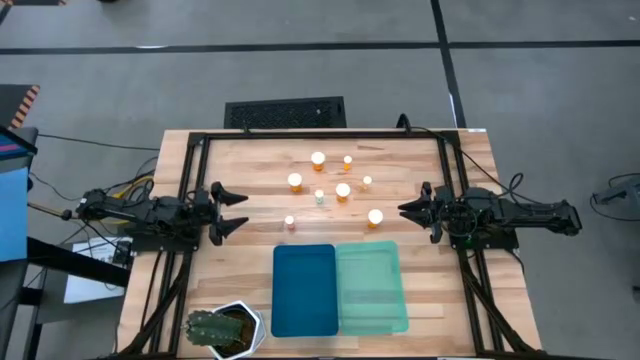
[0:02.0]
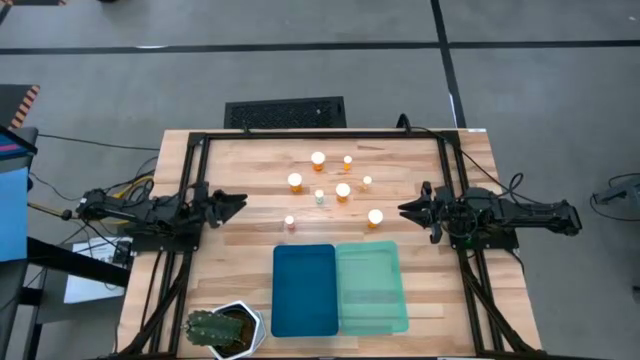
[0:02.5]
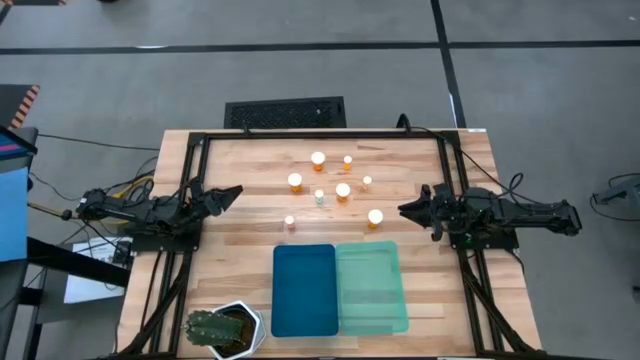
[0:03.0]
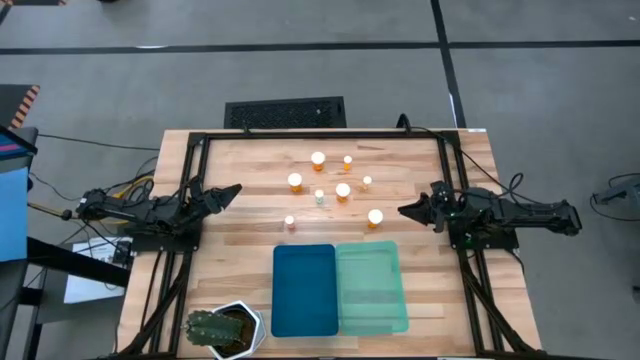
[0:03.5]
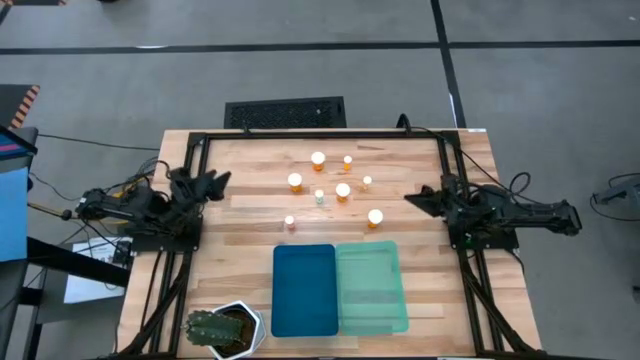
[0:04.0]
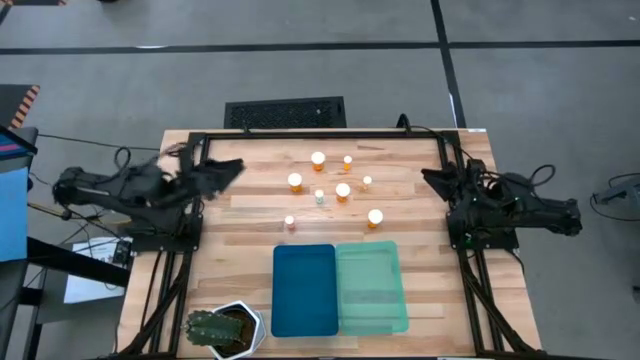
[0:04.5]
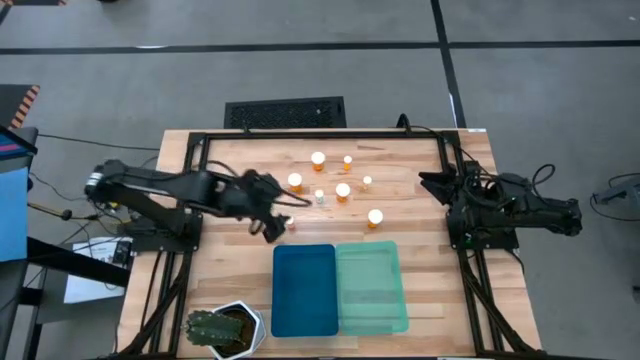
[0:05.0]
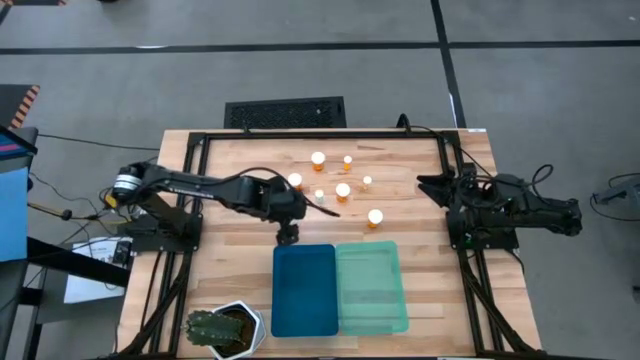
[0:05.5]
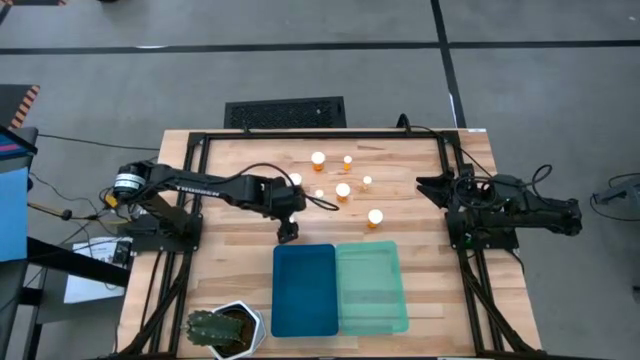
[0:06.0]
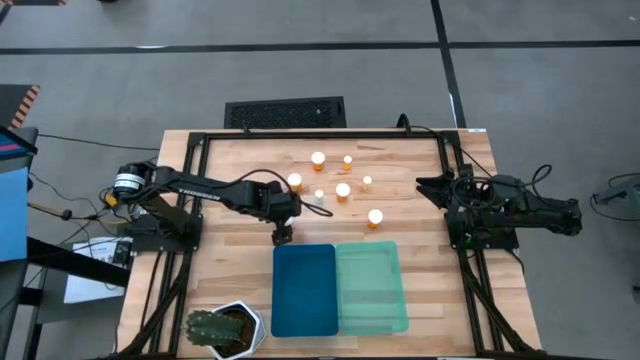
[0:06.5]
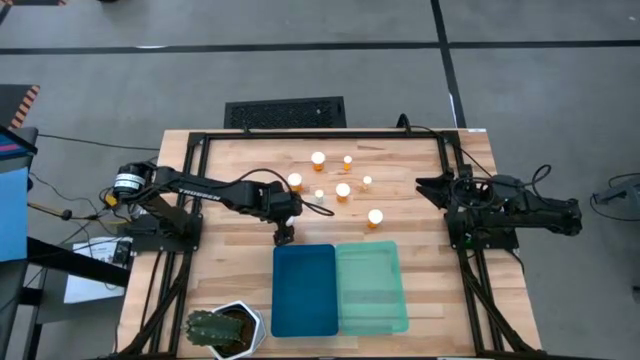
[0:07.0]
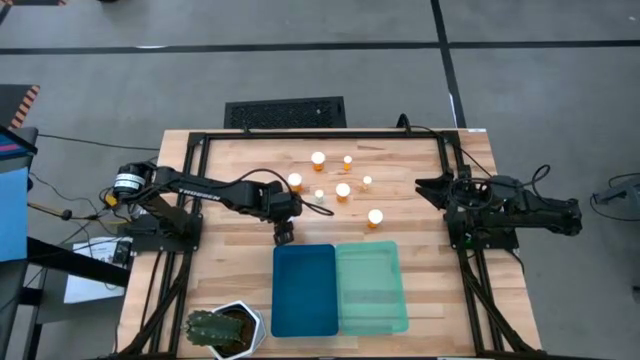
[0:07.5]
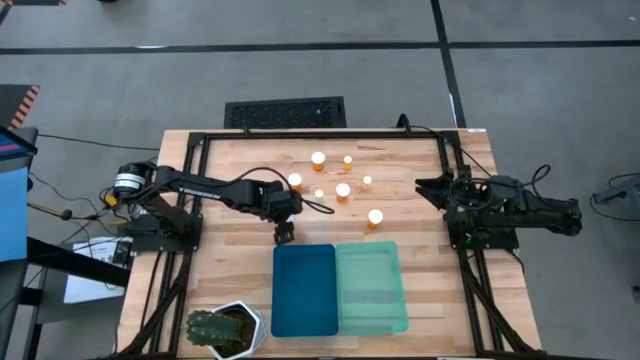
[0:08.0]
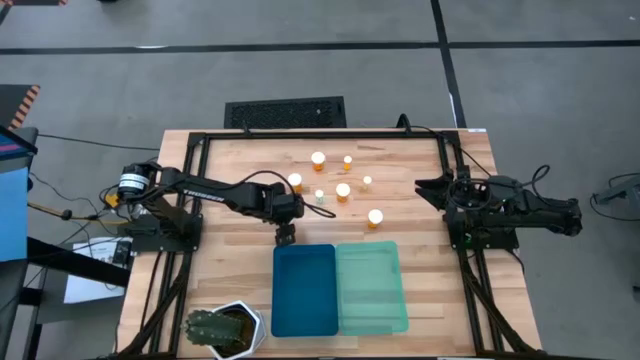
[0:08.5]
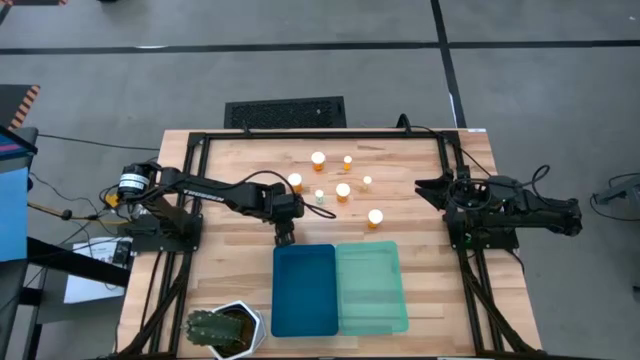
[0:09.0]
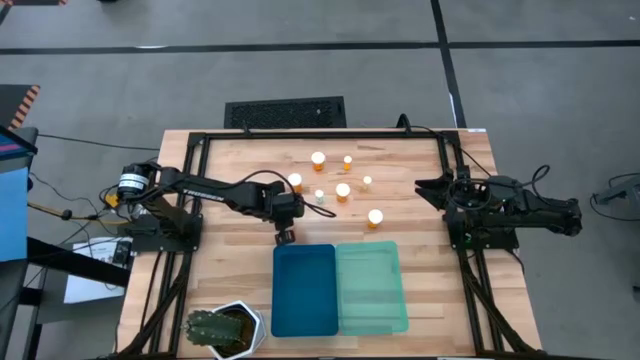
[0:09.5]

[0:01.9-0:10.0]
Task: Pick and place medicine bottles into bin by pill shape (circle, oval)
Put the small pink pill bottle into the blue bin

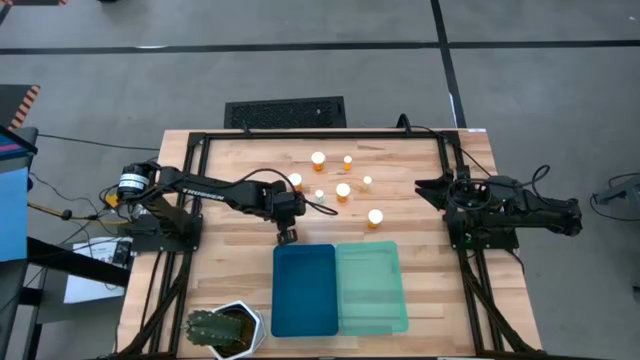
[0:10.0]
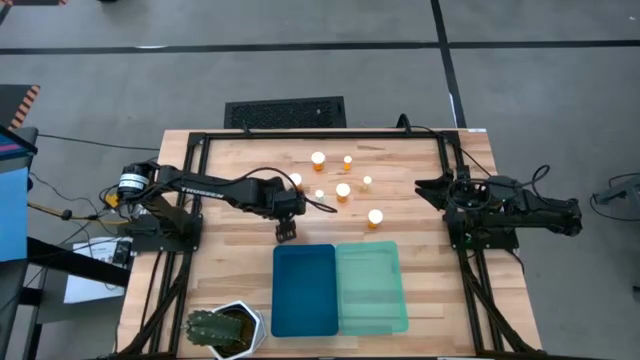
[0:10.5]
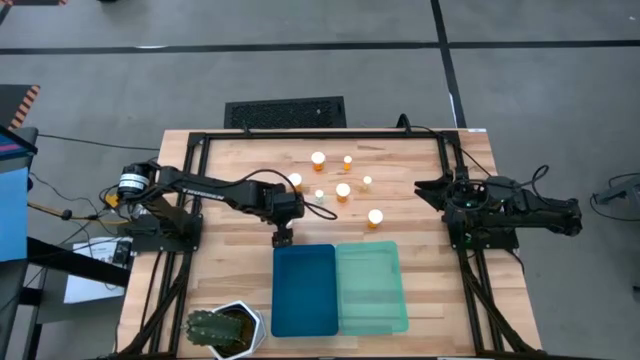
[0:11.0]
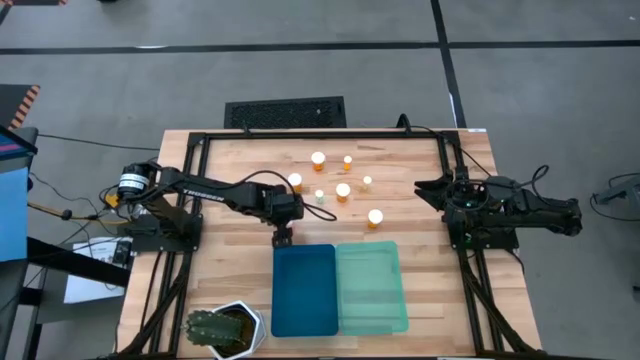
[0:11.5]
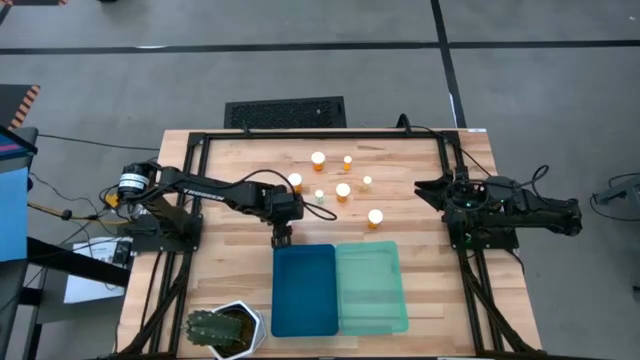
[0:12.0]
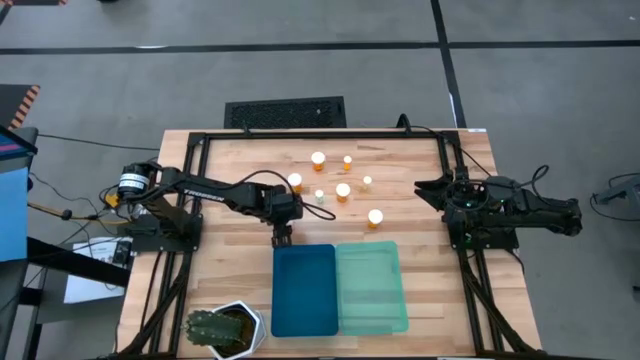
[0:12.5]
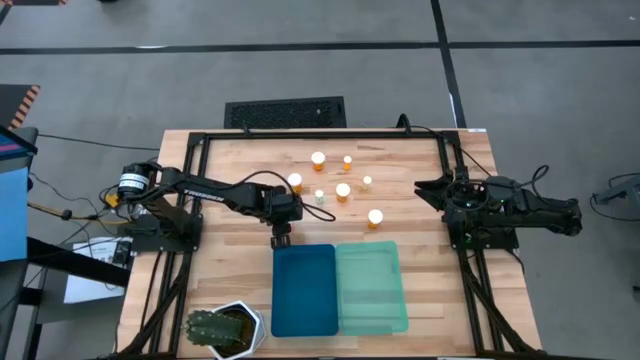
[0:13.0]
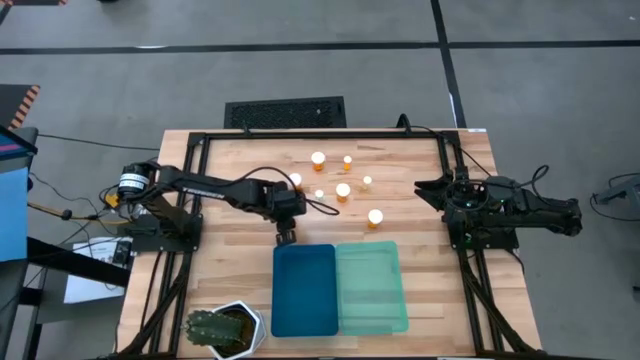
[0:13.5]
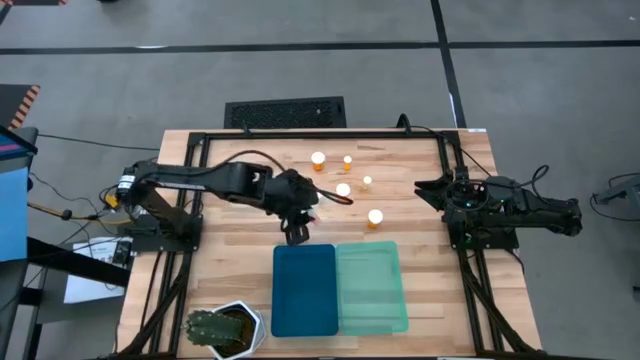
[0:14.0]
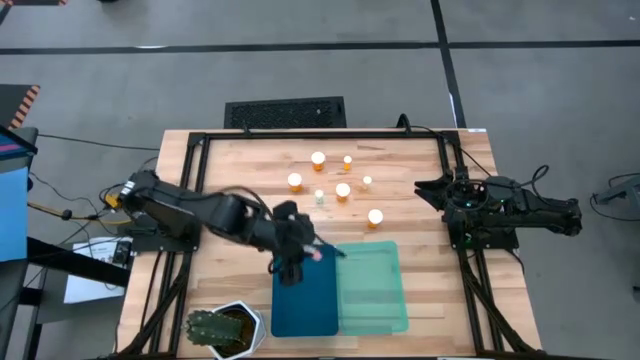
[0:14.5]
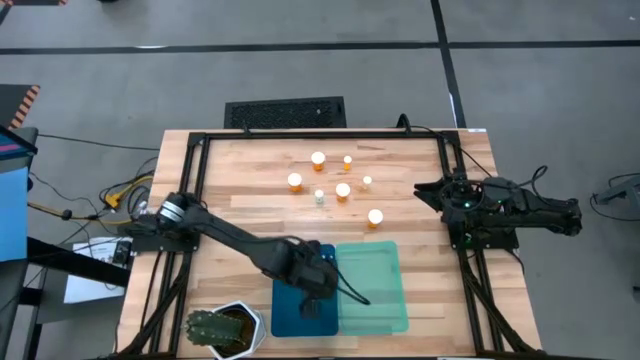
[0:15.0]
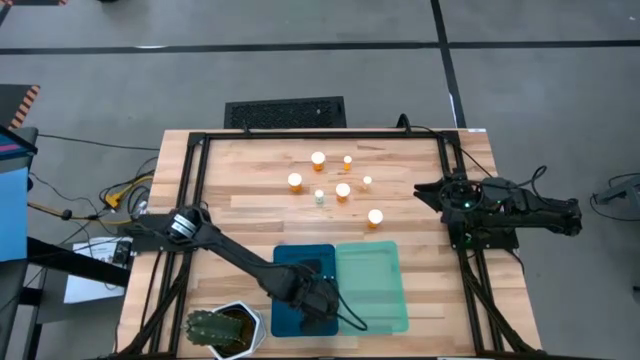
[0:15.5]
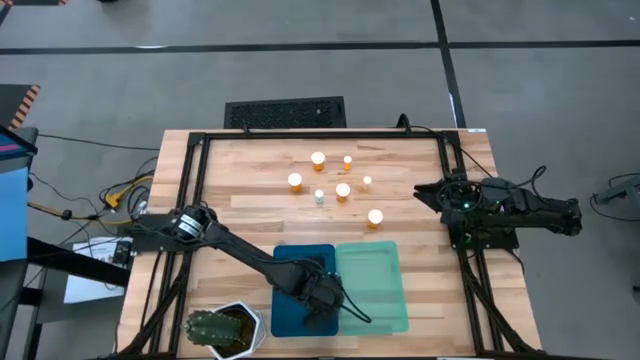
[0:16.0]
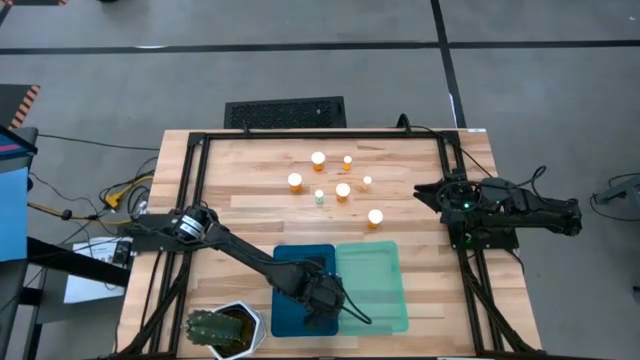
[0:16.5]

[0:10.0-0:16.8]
Put the small pink pill bottle into the blue bin

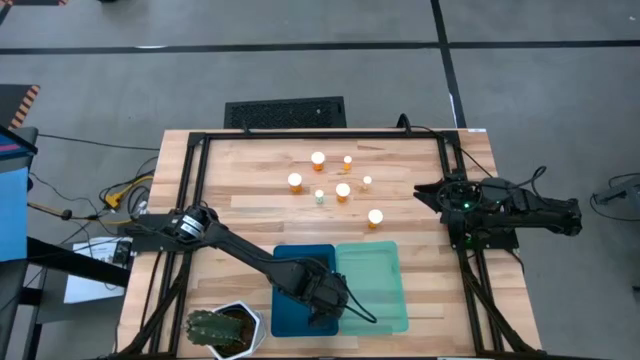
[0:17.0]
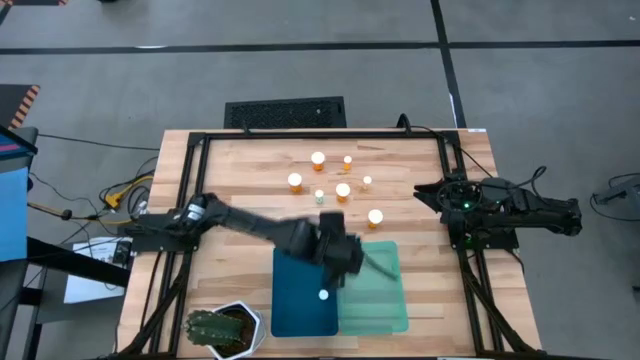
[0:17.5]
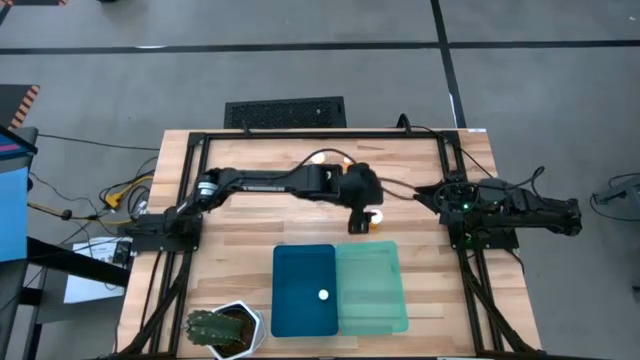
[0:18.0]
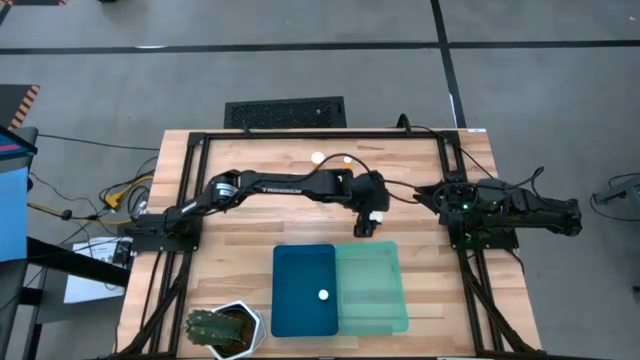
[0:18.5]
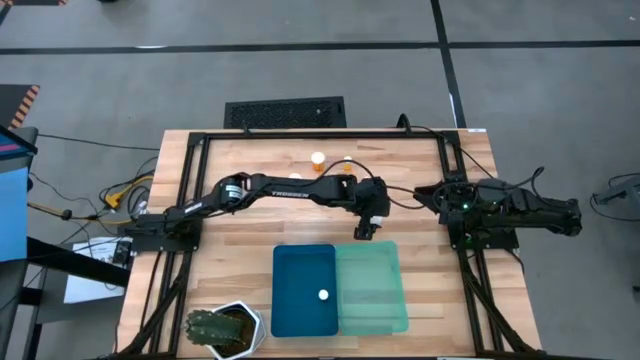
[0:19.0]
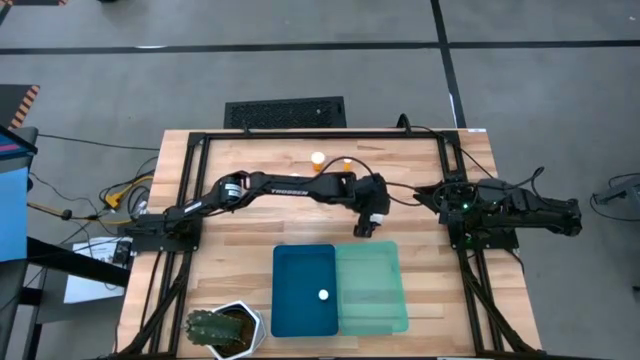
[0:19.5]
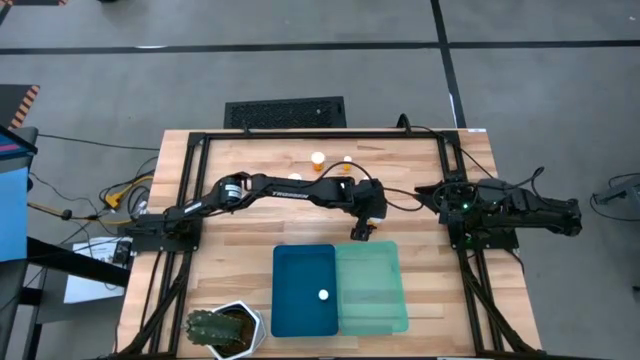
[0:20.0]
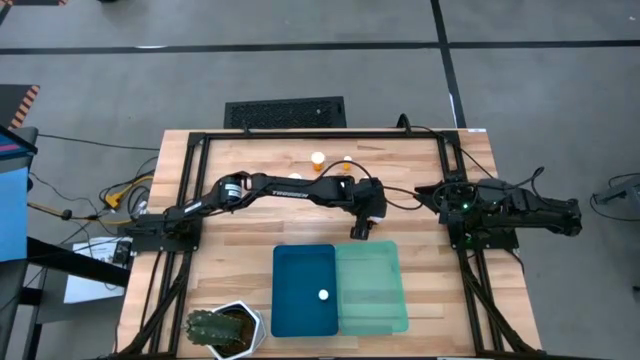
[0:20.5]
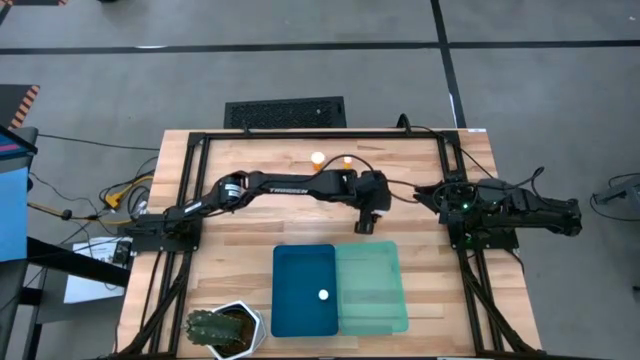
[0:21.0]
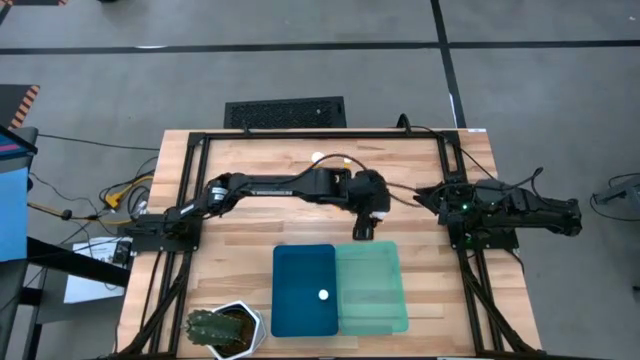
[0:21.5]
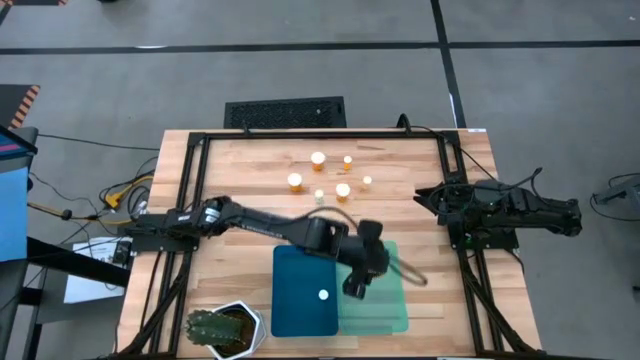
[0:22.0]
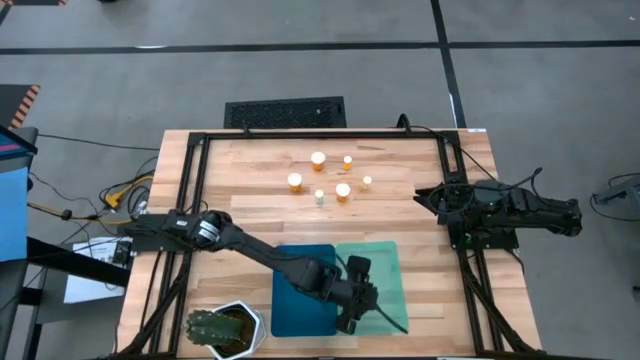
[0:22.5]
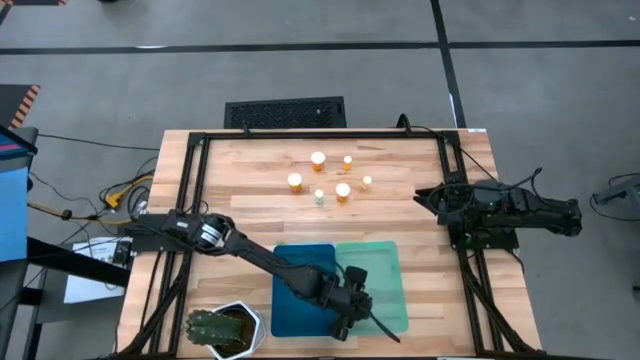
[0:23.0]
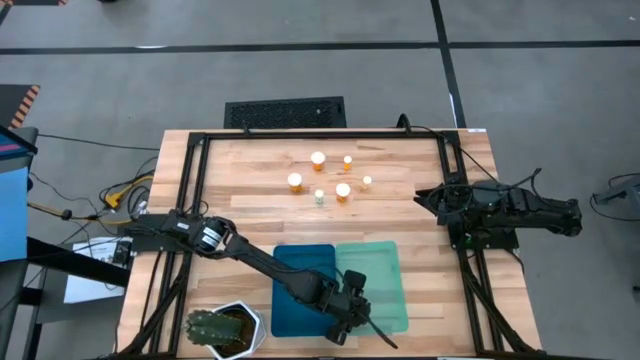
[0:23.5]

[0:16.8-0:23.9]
Put the bottom large orange pill bottle into the green bin
